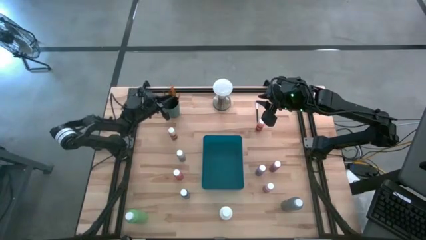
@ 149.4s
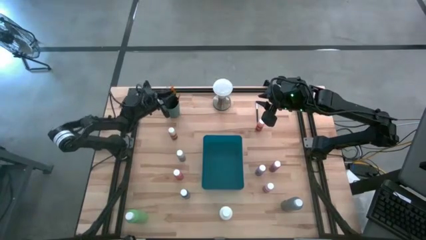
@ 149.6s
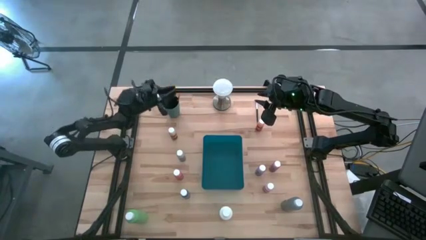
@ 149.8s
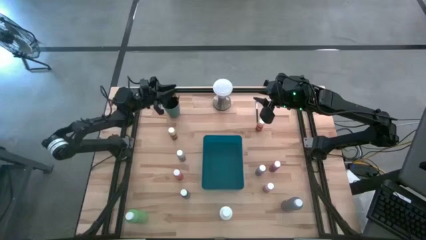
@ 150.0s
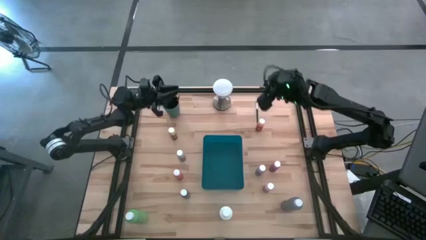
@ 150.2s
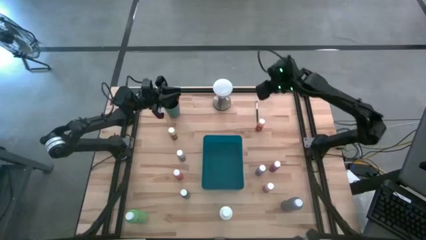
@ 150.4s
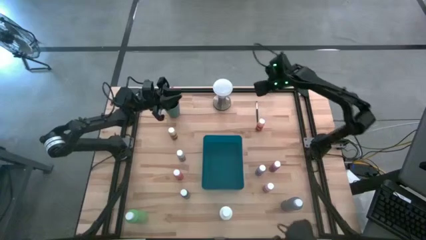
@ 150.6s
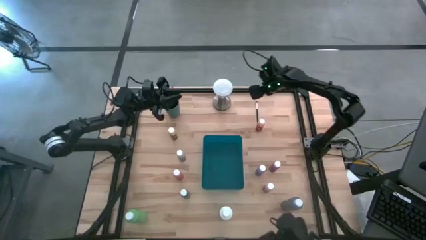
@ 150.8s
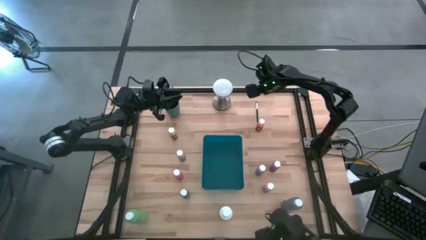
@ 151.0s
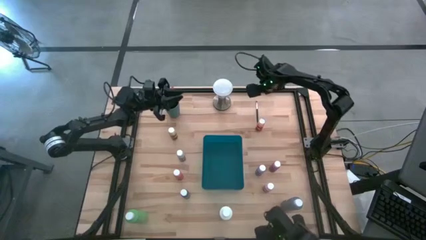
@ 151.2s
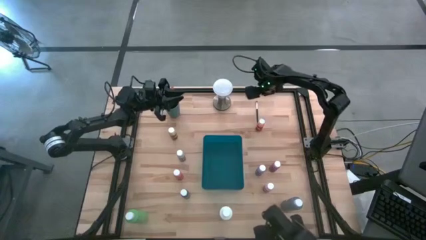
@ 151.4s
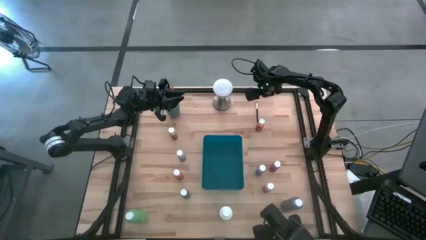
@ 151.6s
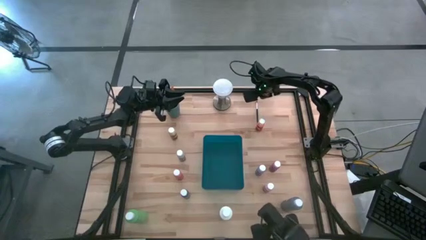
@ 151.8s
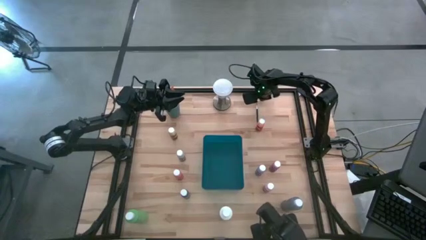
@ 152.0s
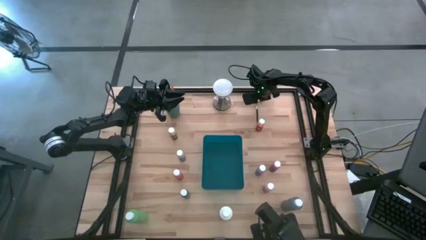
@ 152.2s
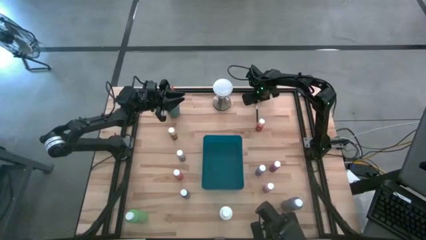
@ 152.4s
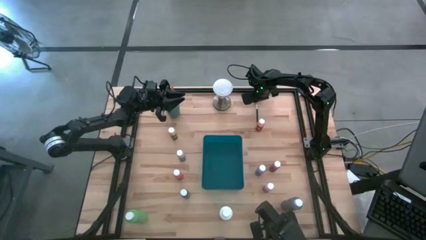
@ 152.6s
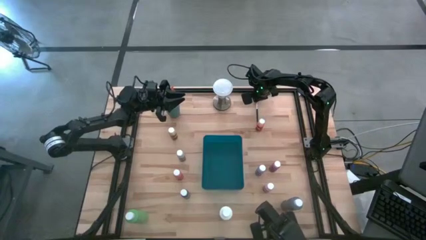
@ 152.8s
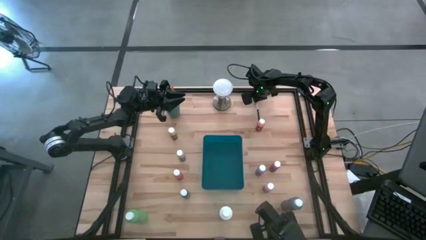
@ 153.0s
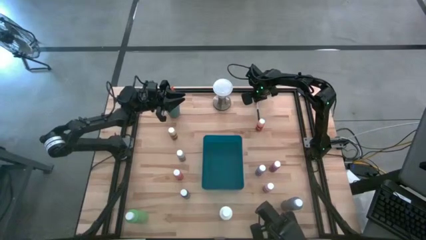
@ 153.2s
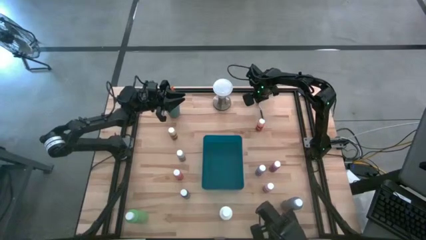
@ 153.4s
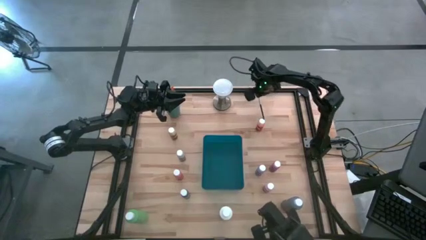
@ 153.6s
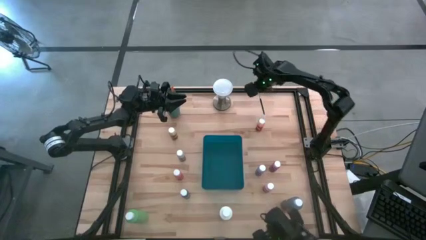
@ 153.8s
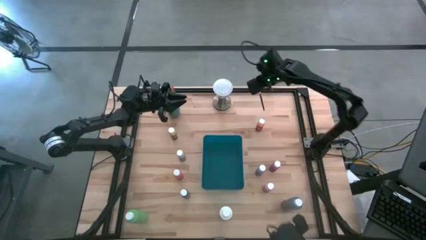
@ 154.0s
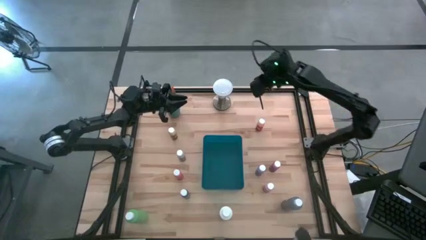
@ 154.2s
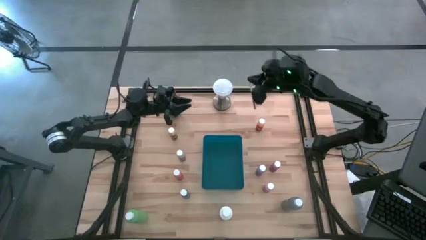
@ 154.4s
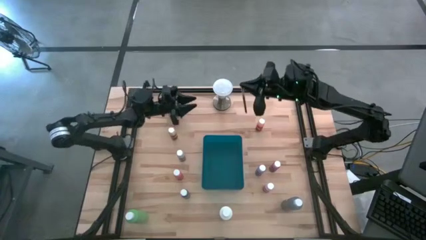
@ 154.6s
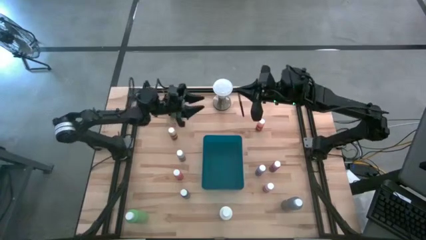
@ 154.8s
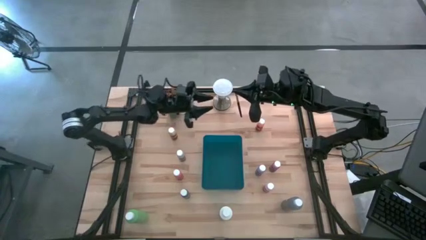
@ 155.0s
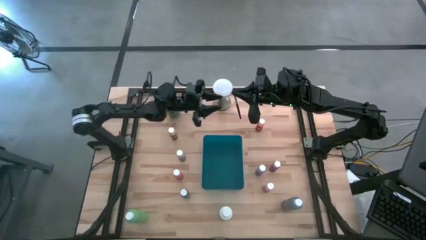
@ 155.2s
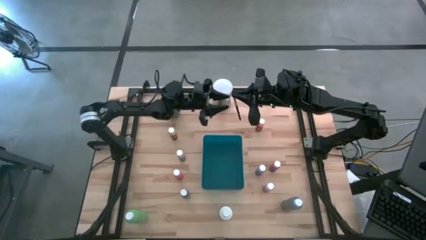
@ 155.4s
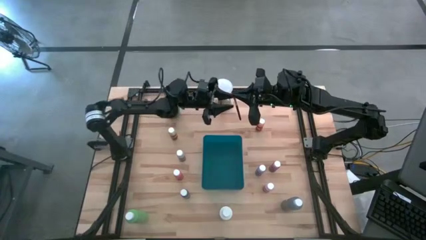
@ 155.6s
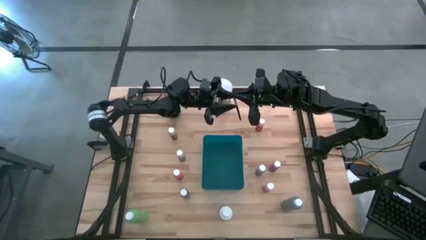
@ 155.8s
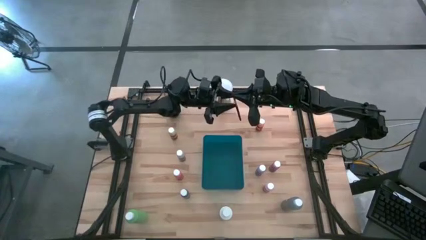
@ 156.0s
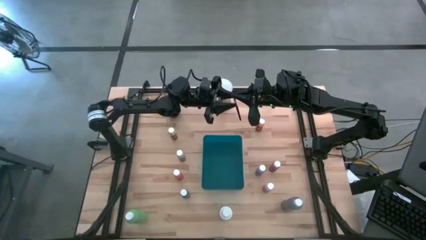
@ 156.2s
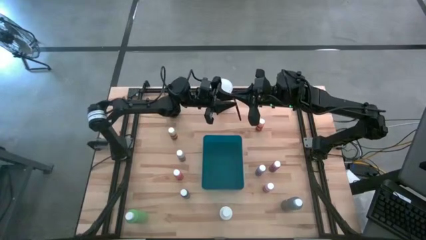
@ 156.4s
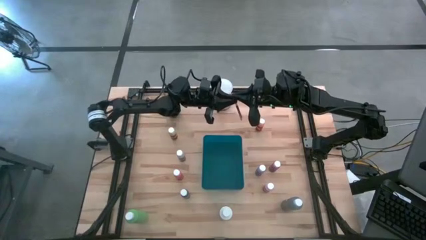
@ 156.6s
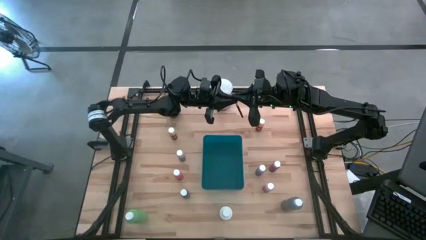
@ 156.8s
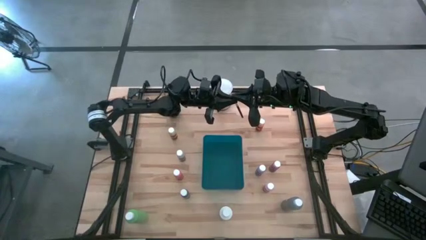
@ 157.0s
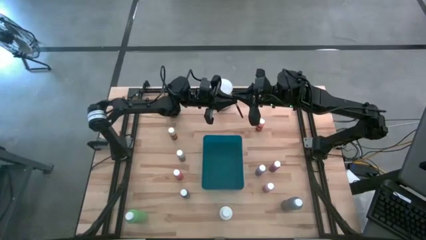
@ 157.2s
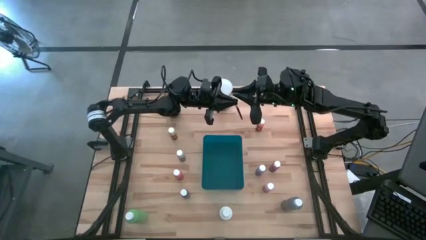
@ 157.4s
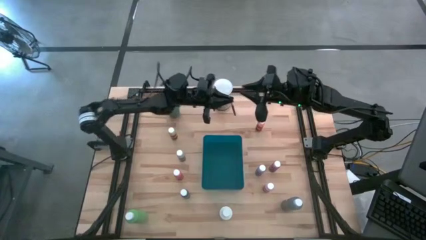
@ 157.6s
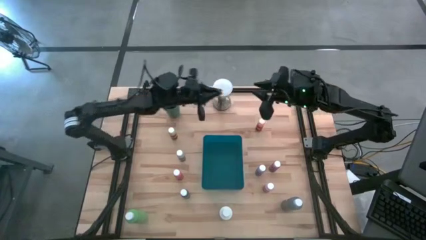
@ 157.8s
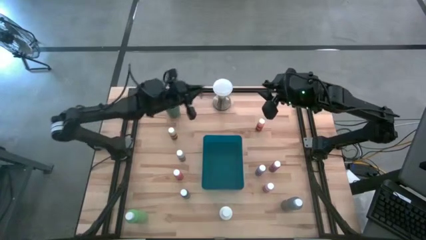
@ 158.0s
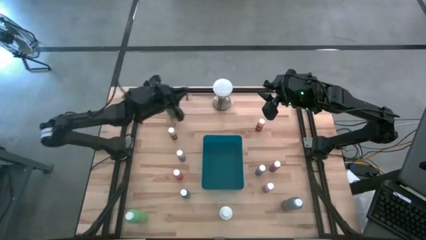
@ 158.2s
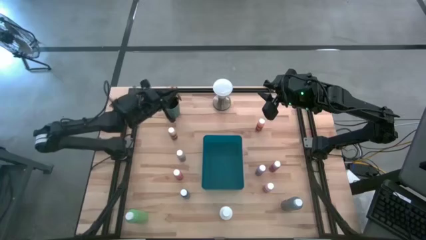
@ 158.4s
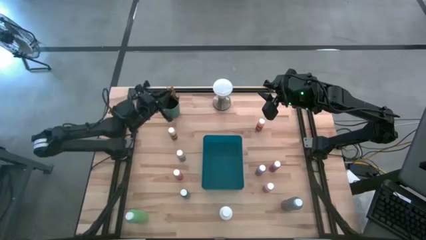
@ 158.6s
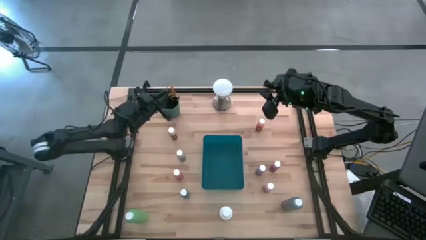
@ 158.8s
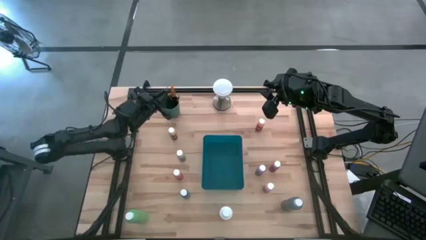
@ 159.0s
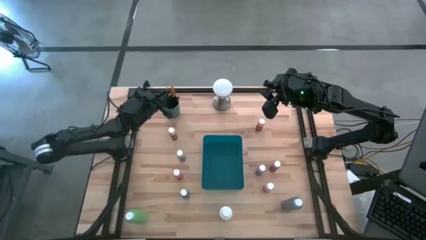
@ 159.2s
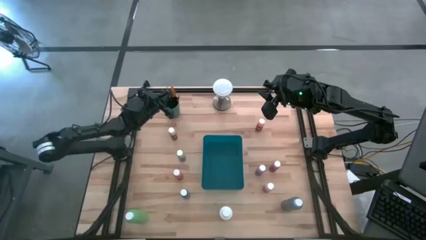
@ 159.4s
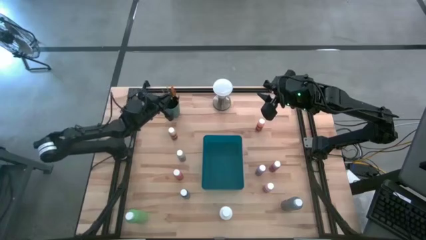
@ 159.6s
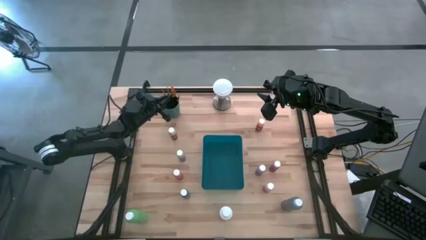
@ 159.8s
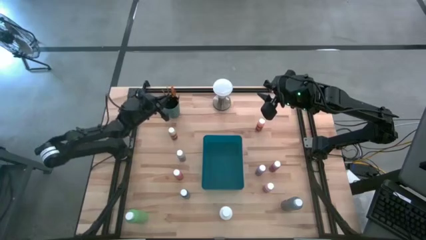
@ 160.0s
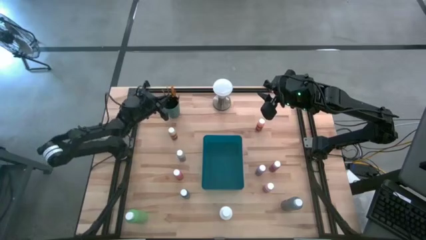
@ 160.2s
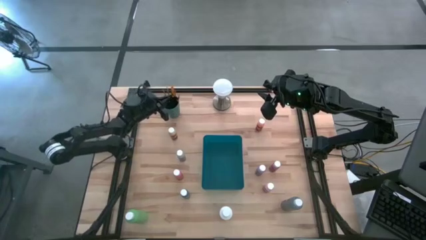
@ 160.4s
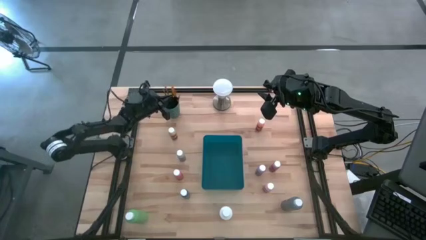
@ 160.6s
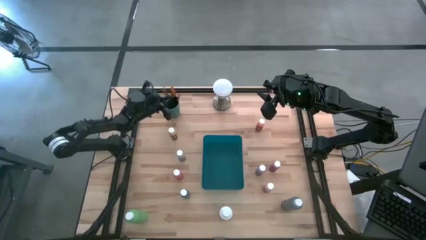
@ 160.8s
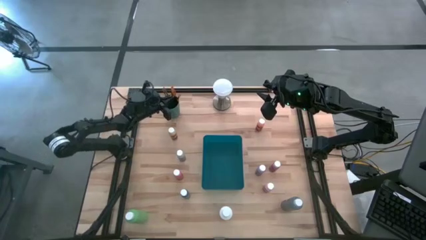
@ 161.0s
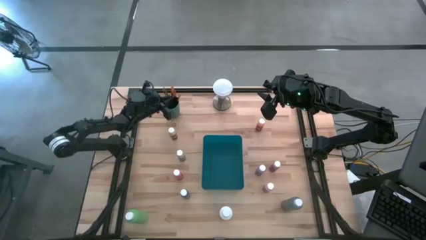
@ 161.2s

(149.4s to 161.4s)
Task: Pick & Place Paint Supplies
Put the silver paint brush into the green cup

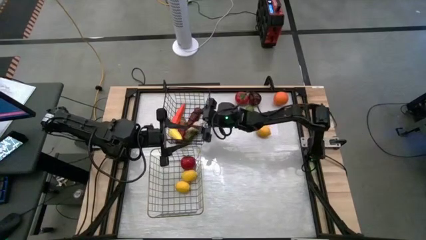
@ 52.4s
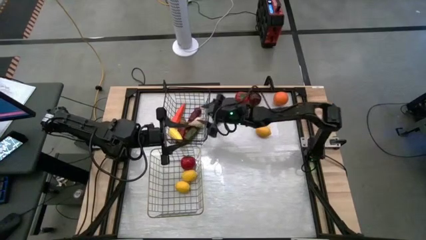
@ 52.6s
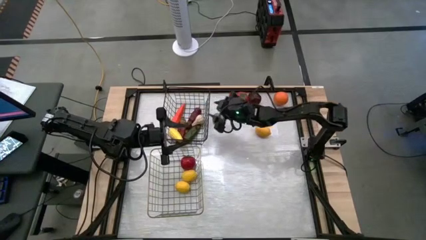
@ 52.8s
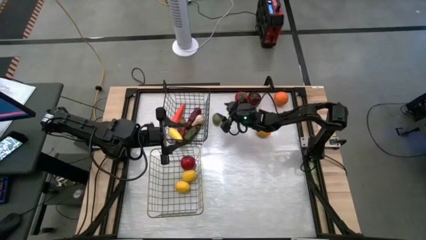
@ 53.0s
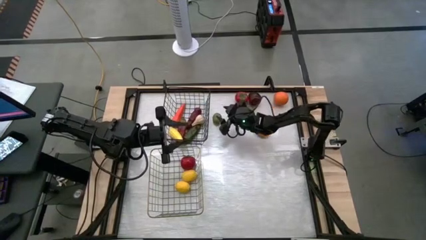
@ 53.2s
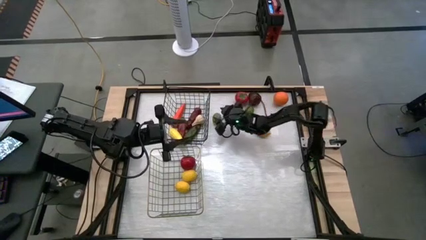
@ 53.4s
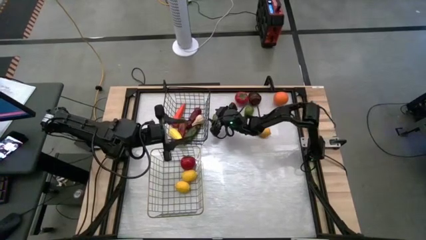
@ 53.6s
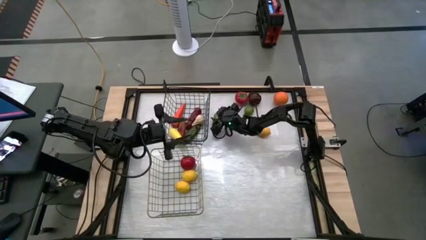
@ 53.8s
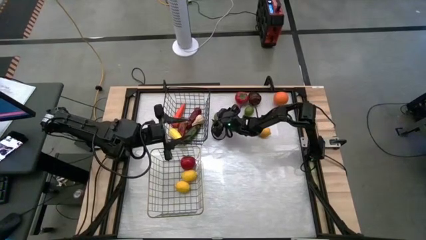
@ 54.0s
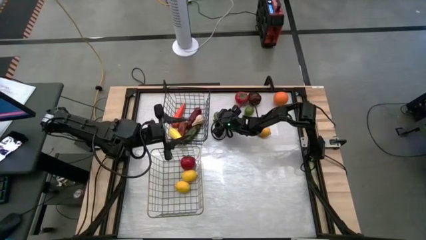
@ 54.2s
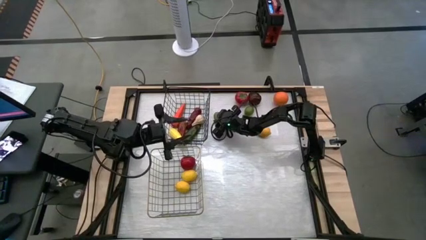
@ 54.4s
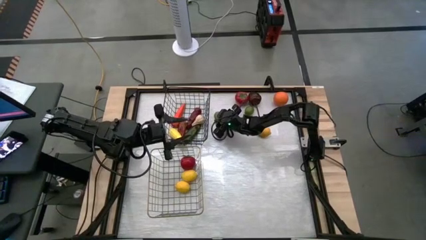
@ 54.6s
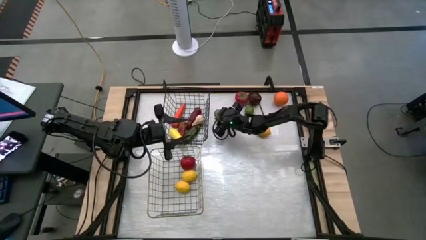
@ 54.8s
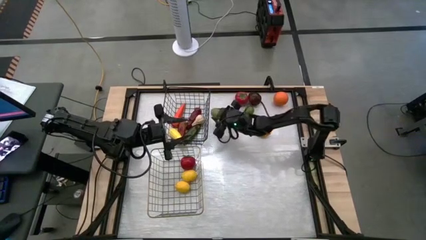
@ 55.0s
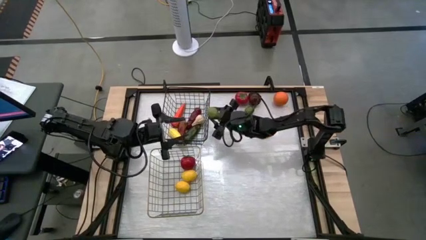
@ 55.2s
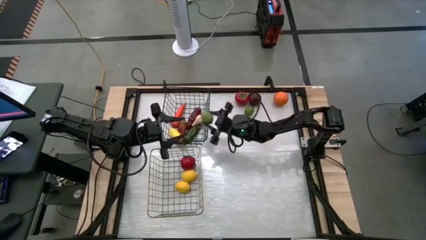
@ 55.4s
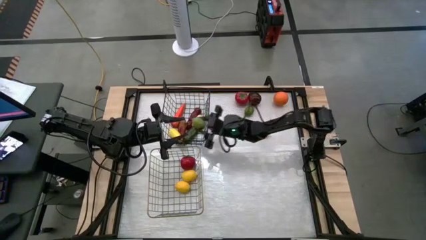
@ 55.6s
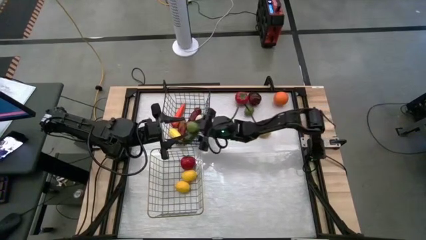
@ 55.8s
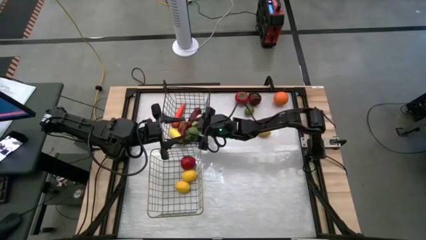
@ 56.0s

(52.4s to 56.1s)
Task: Sort produce into baskets
Put the left green lime into the black wire basket

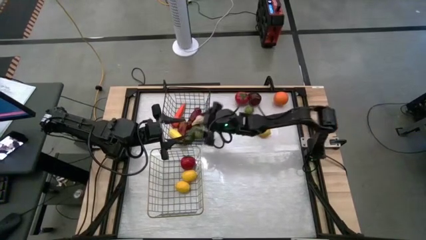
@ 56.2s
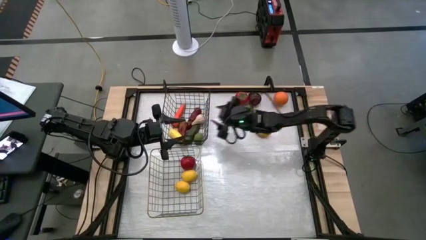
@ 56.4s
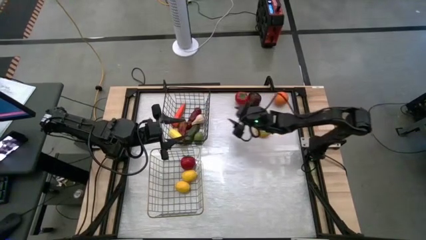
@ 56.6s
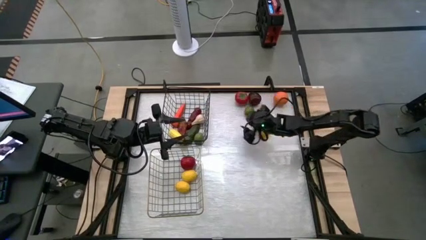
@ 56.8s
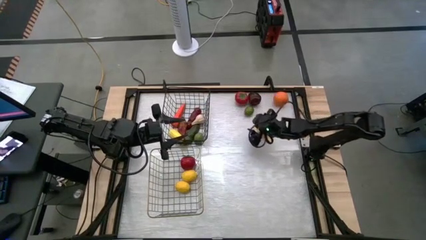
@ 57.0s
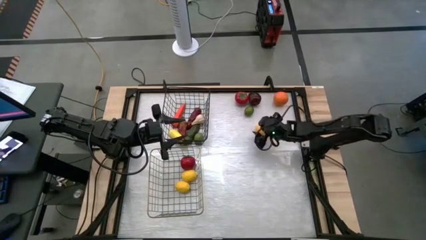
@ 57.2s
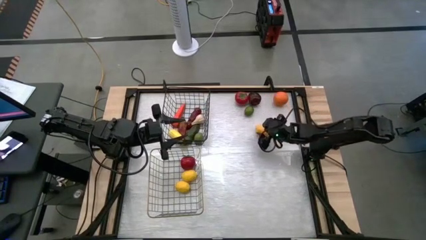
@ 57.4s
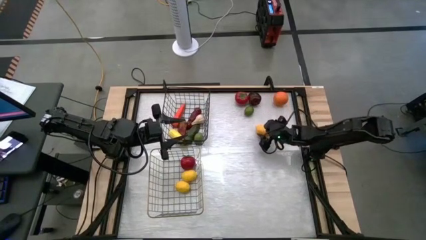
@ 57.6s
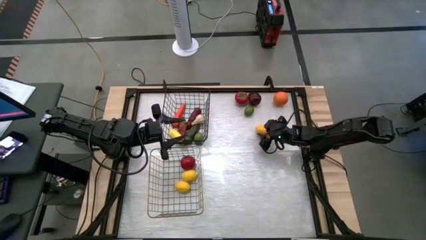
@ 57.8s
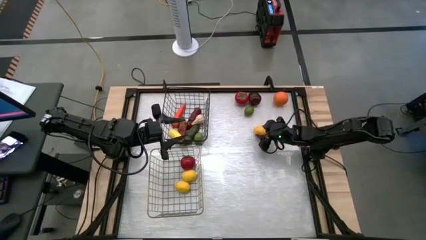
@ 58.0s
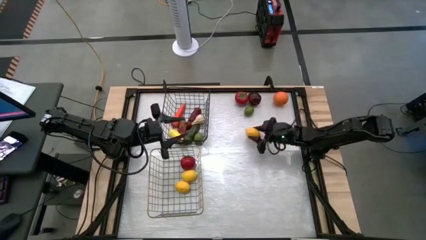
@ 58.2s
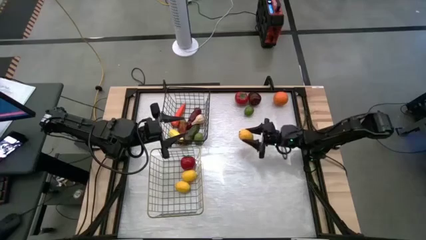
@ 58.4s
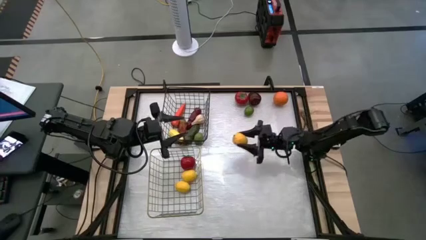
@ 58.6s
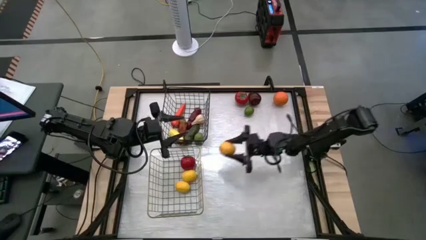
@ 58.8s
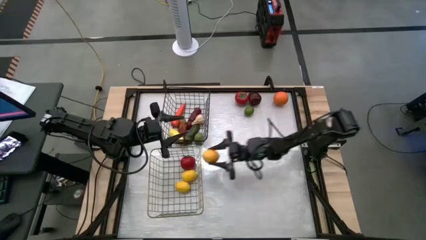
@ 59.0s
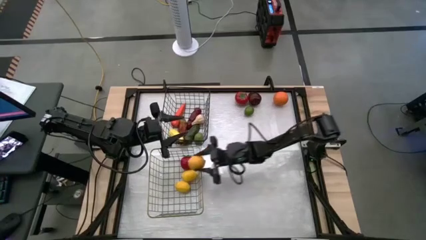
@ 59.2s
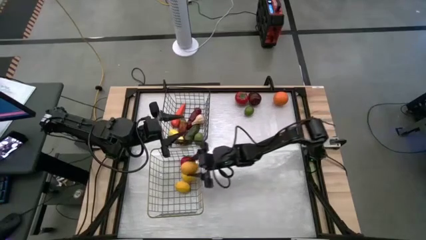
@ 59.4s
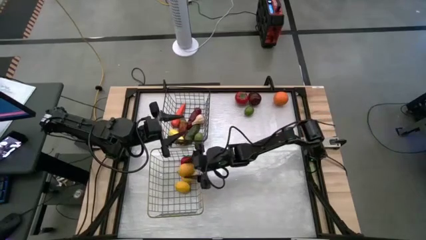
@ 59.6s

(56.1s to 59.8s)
Put the yellow lemon into the gold wire basket
